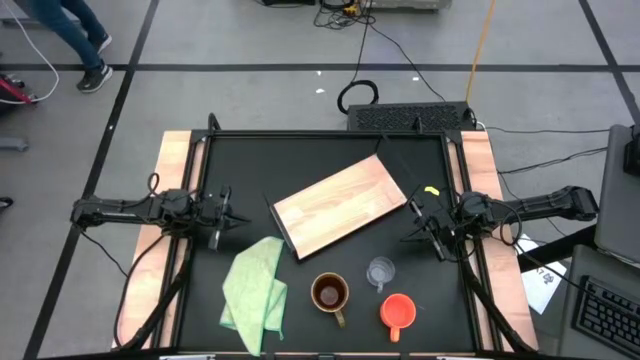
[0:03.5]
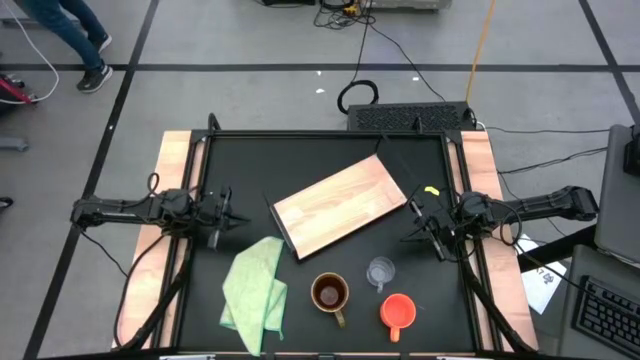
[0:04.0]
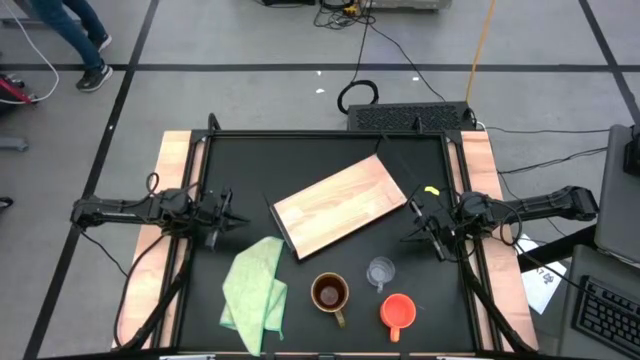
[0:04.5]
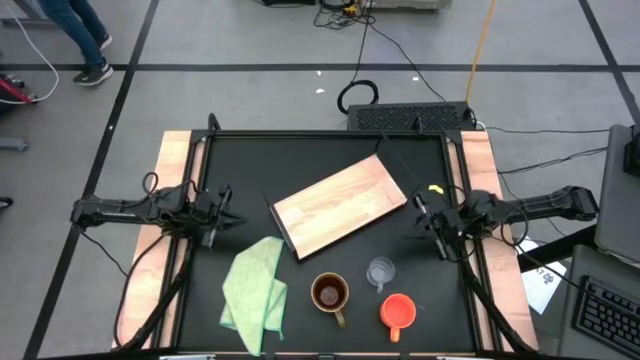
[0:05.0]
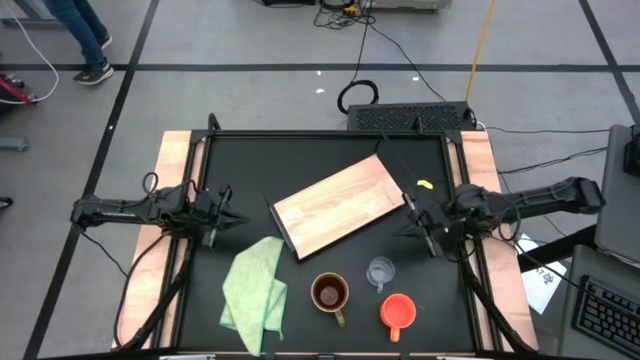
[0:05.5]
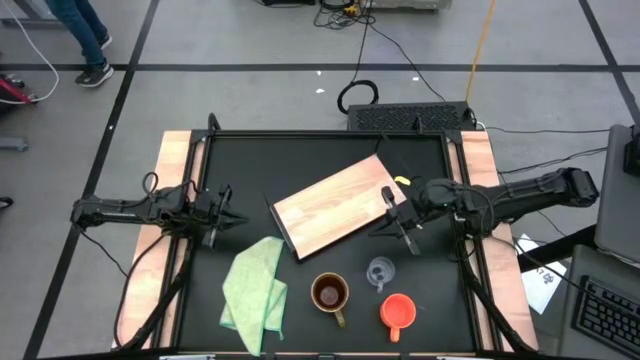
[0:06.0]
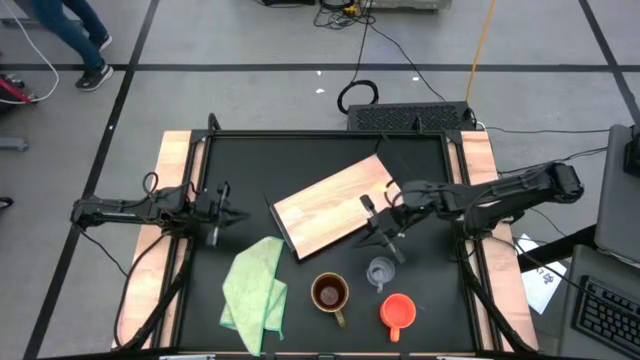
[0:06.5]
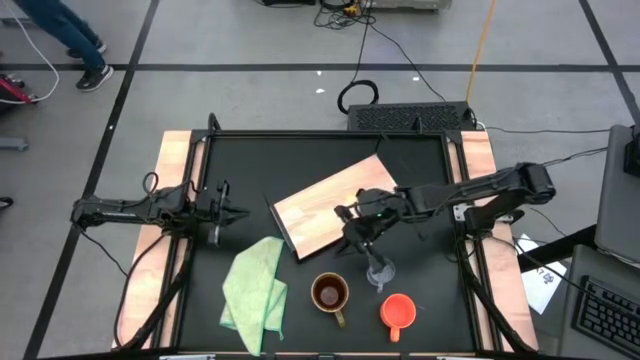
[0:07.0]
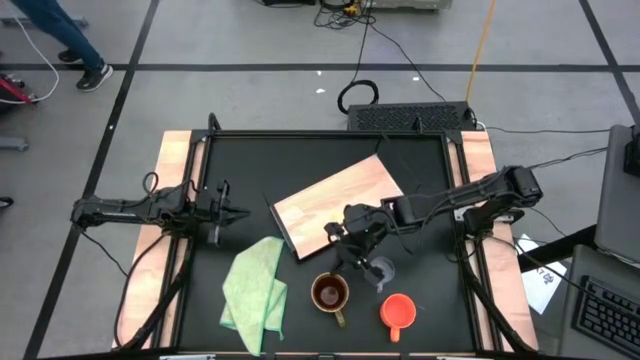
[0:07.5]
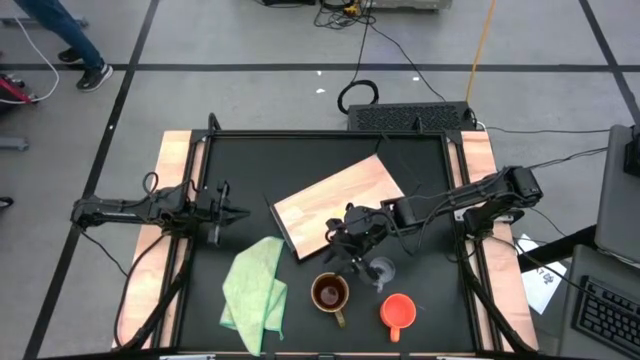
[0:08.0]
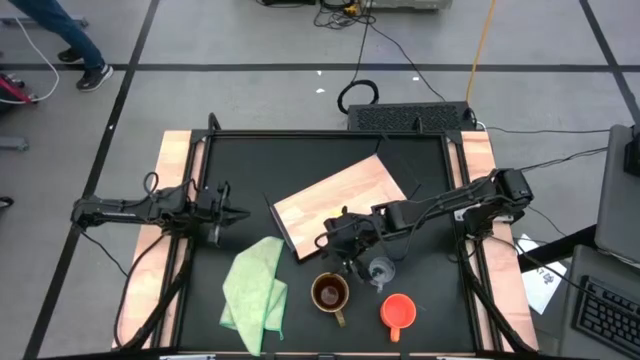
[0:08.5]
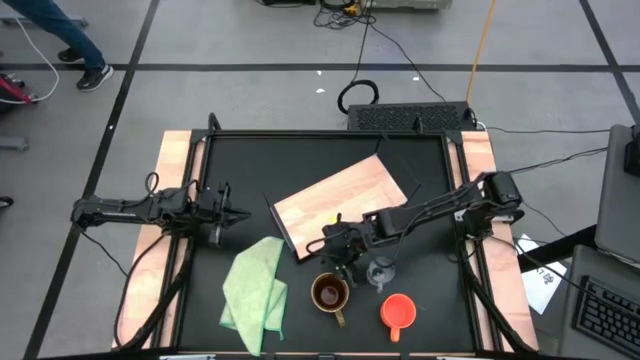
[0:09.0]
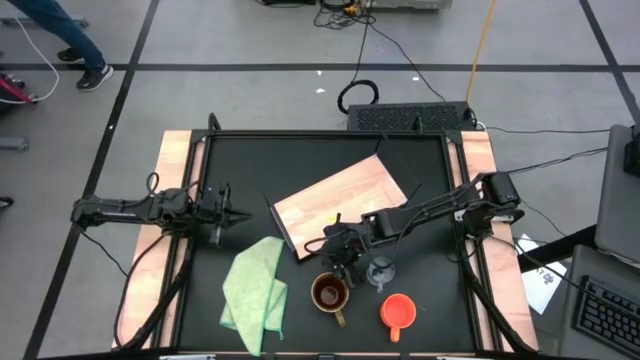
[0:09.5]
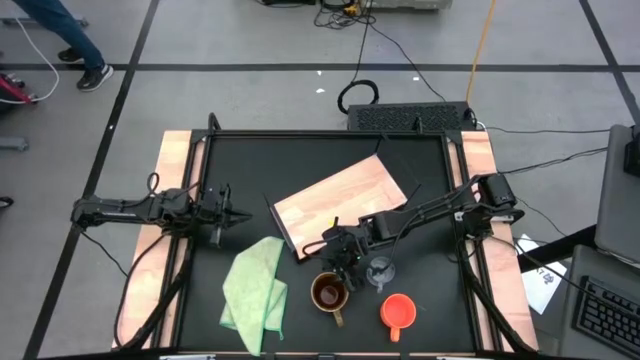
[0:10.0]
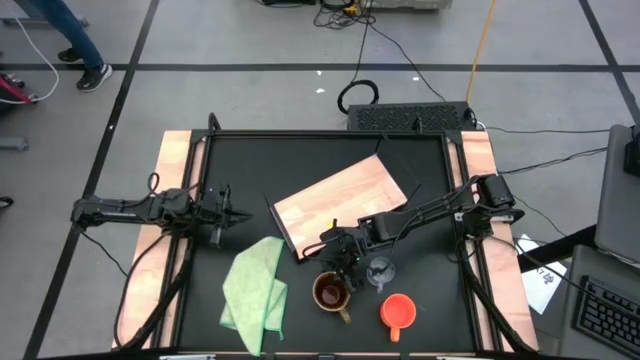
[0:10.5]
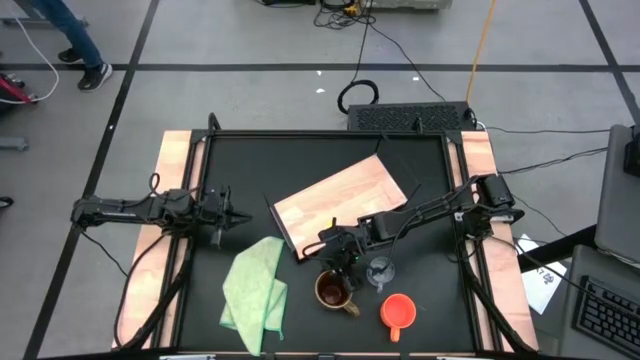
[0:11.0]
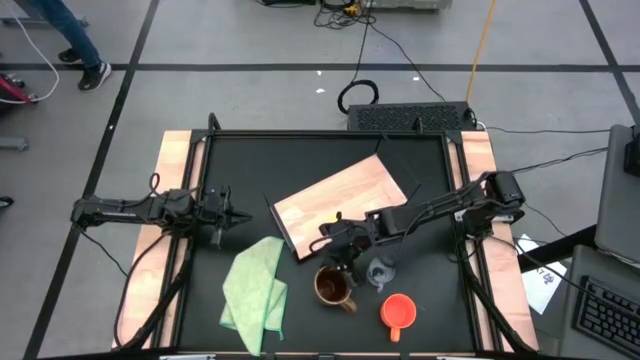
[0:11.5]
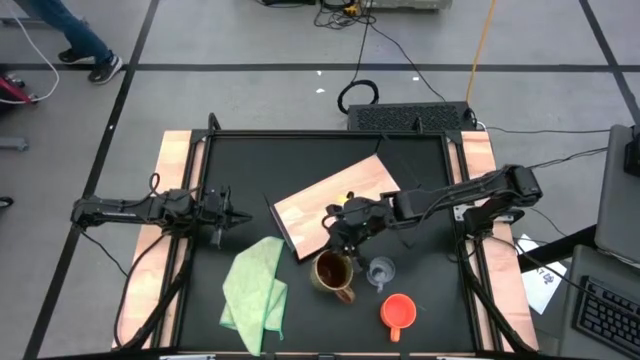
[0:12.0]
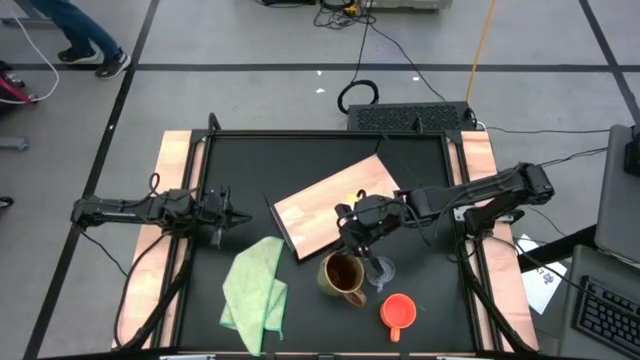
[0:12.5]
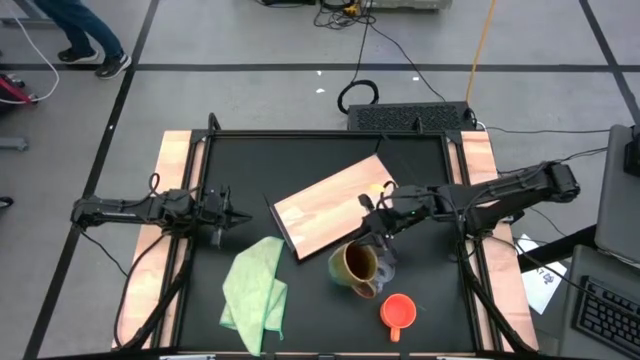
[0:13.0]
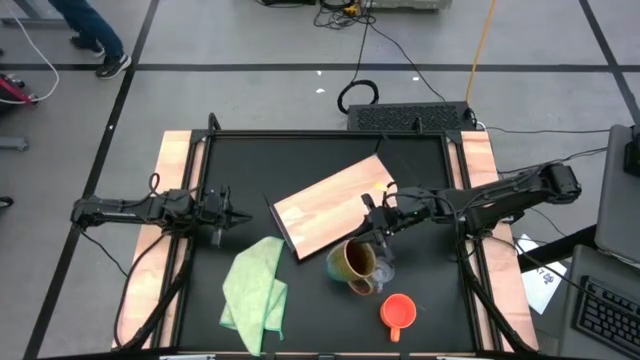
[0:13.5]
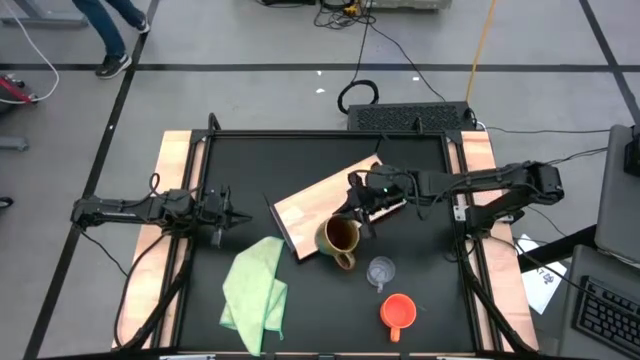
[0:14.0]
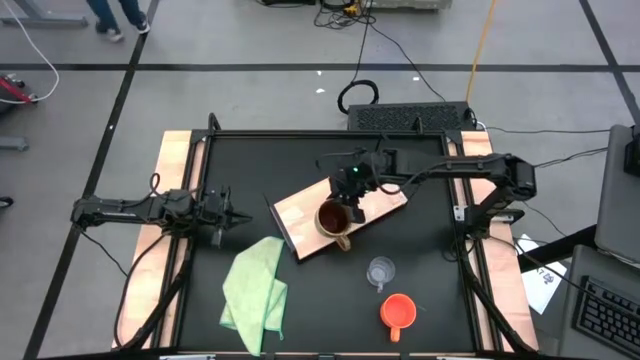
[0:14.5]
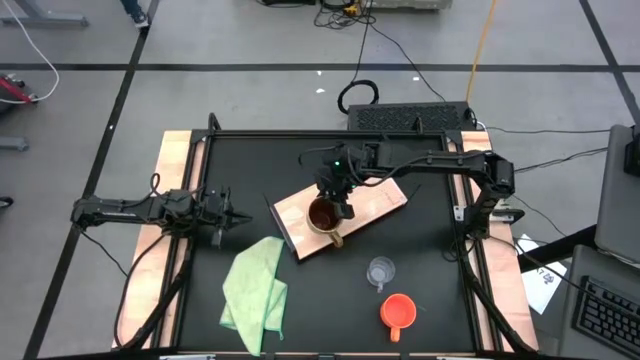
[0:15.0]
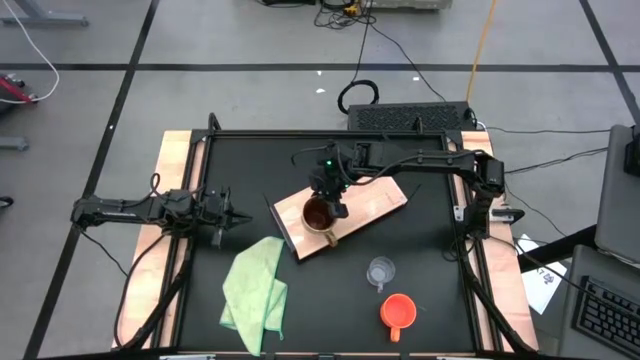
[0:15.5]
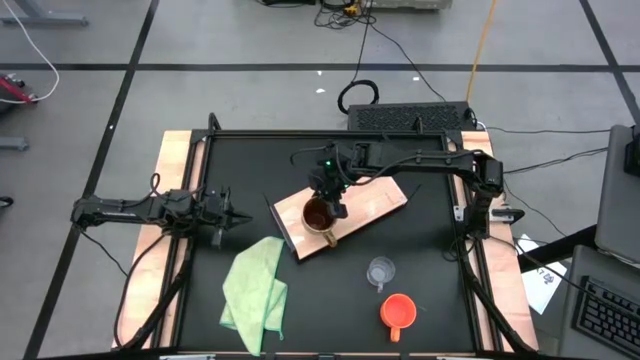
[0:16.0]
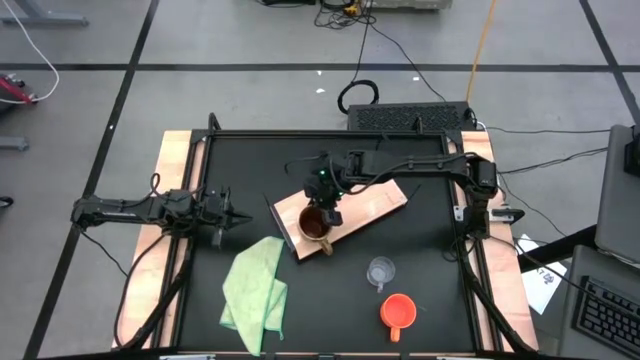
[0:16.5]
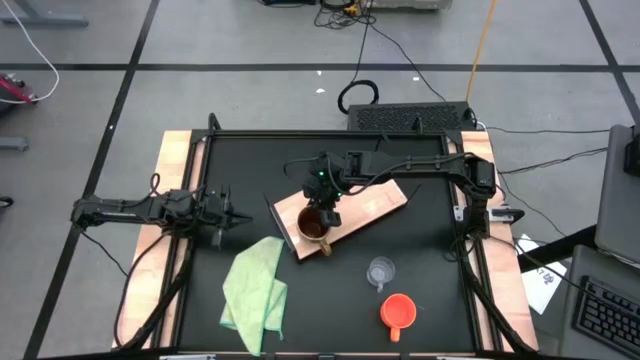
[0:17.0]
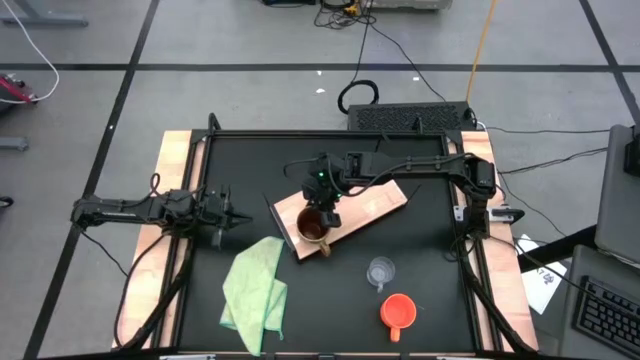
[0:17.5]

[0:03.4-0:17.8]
Task: Stack small to large cups/mugs on shelf
Put the green mug on the shelf

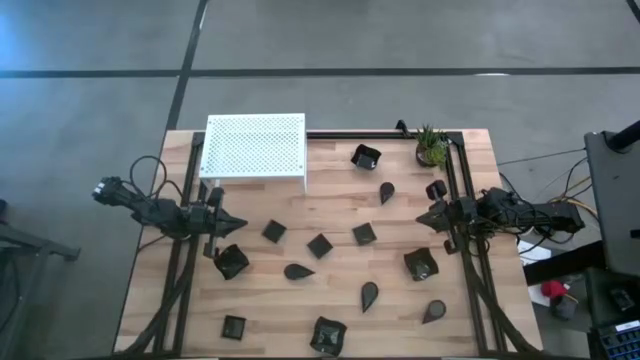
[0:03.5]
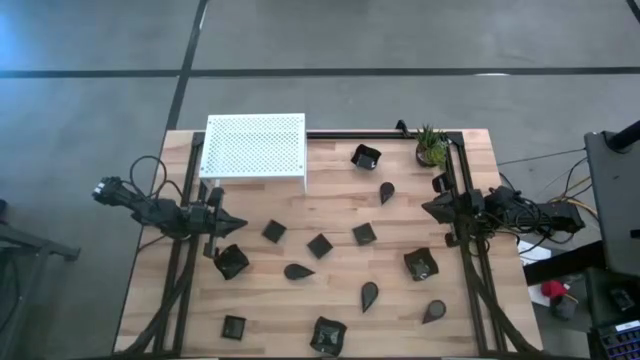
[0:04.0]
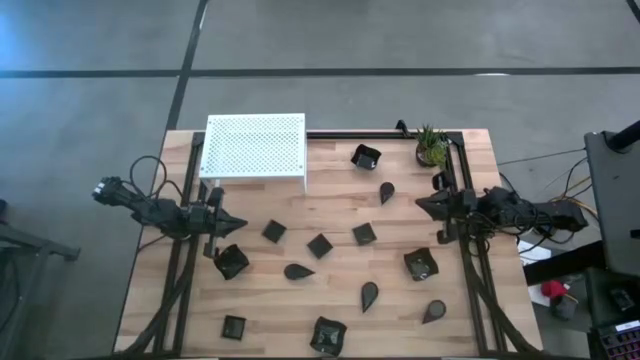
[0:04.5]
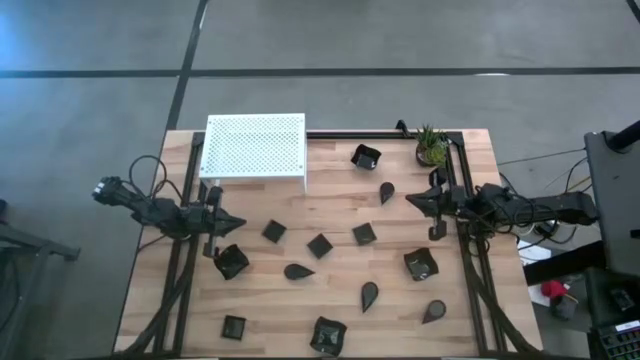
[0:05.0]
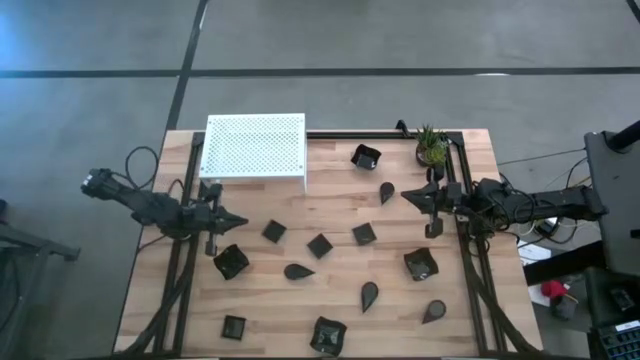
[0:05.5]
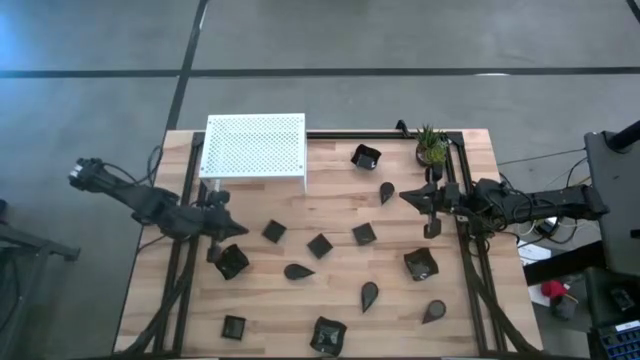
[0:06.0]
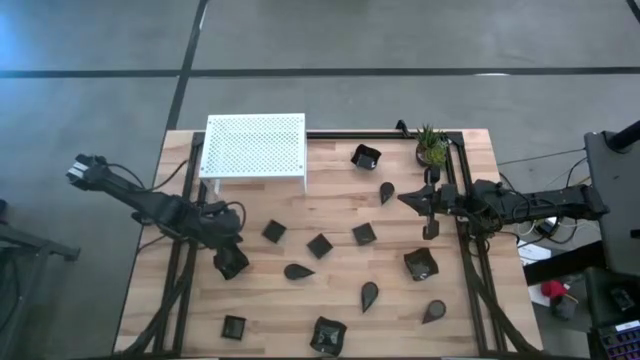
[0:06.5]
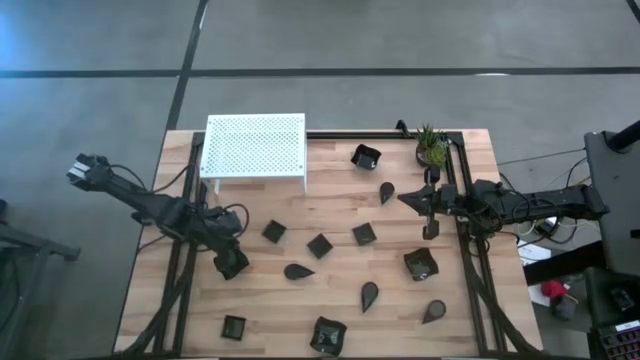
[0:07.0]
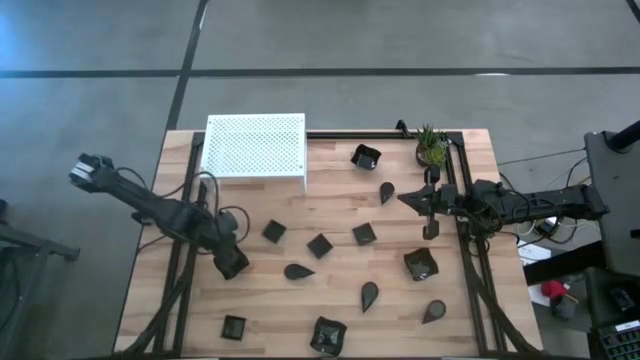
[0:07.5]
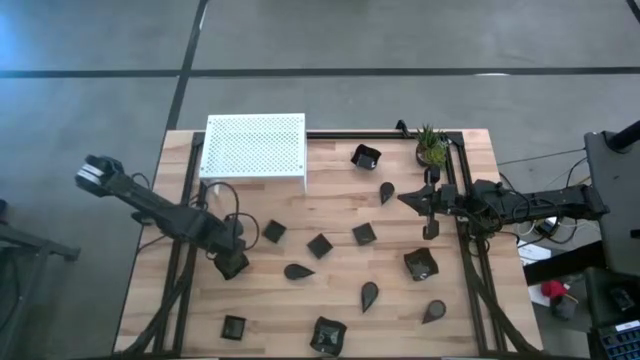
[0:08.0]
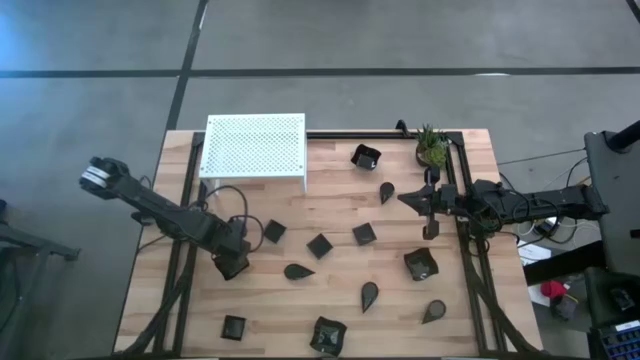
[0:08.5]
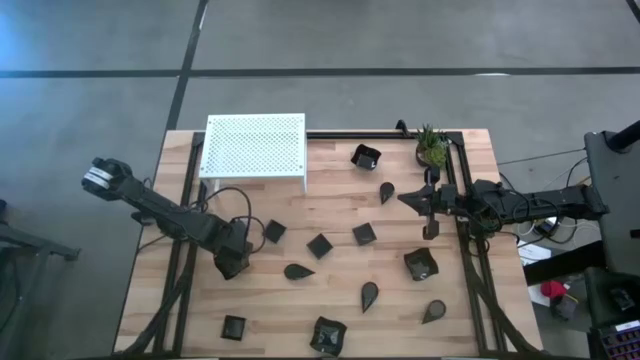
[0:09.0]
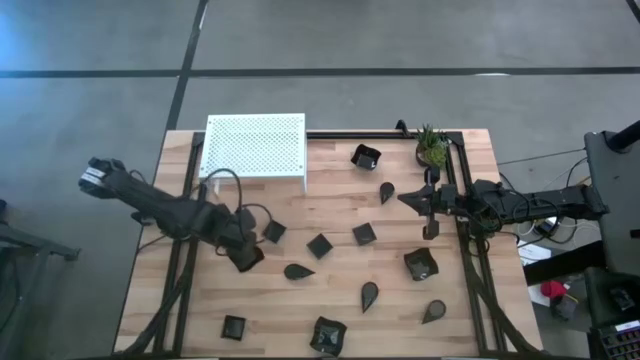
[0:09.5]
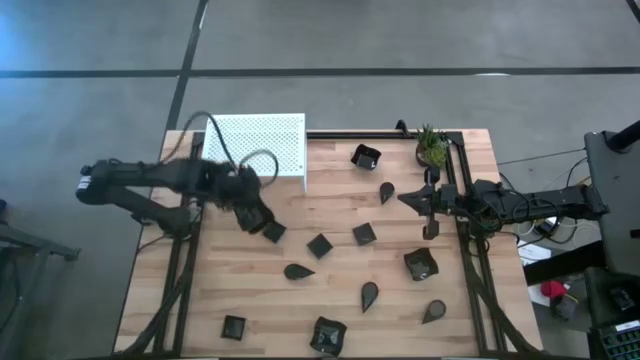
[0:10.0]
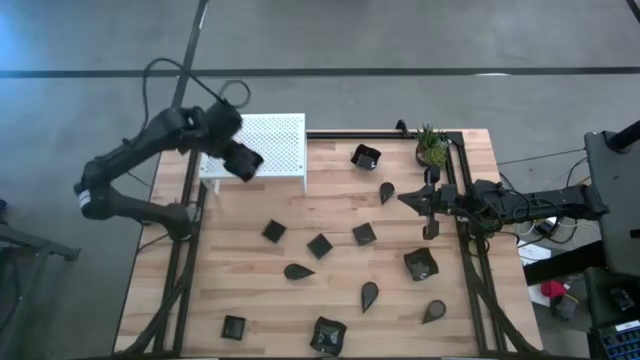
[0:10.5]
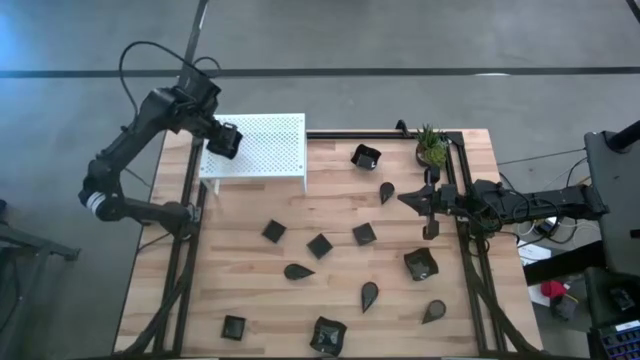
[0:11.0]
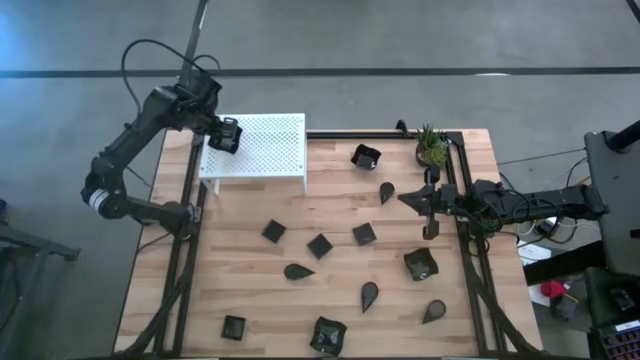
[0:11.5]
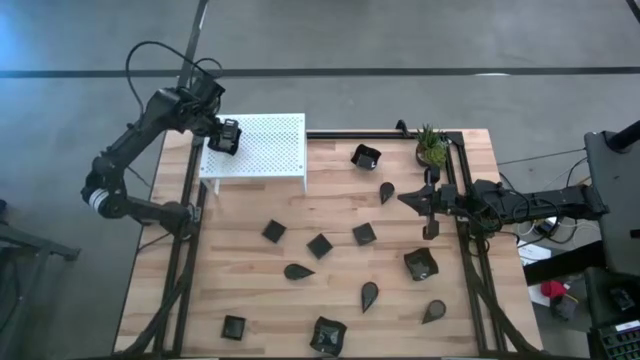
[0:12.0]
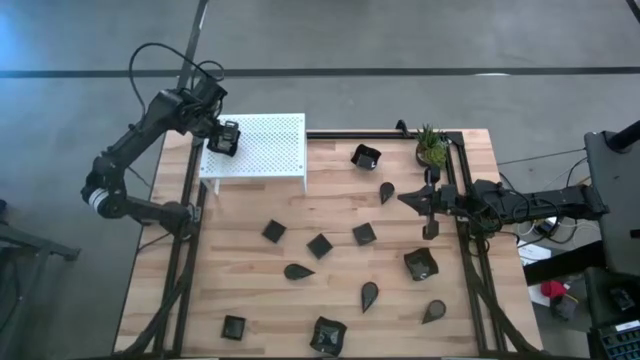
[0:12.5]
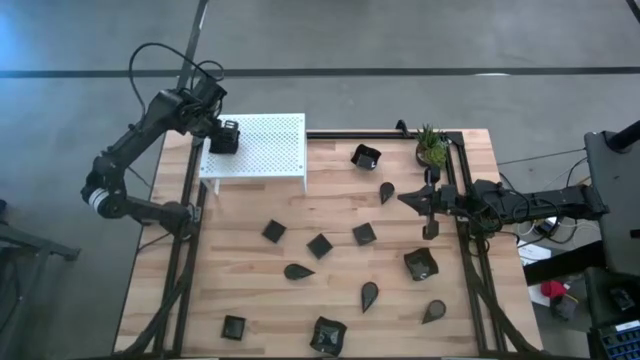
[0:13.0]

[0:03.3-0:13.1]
Task: Pick & Place Mini shaped plates
Put the distorted square plate on the shelf
